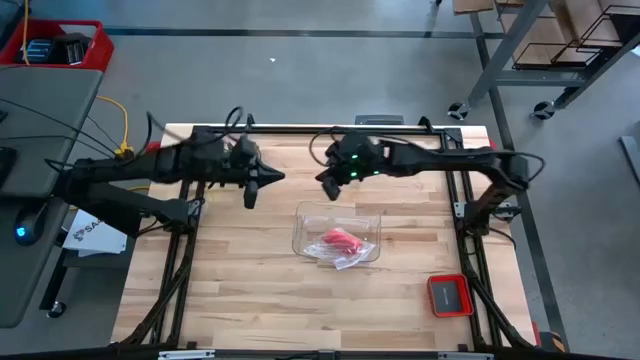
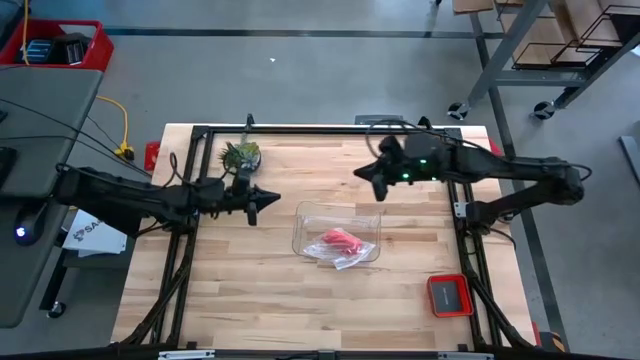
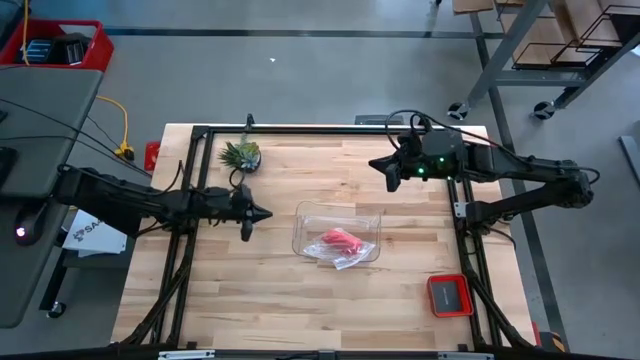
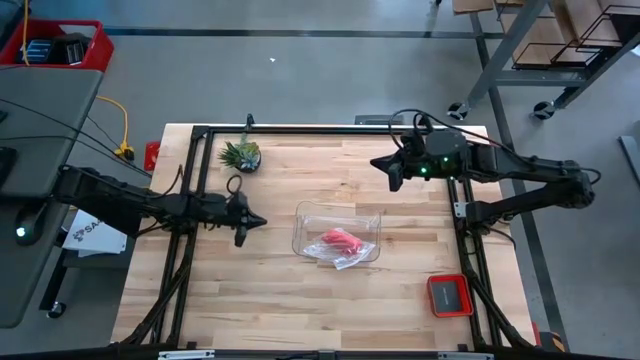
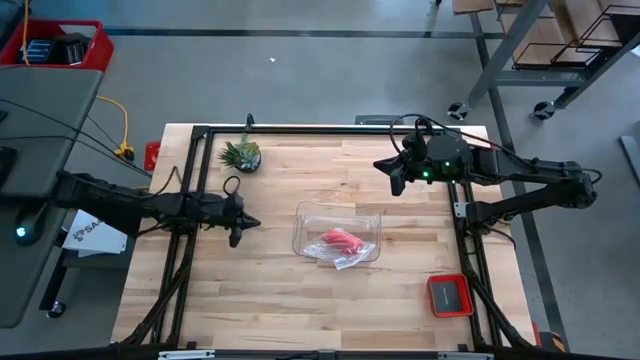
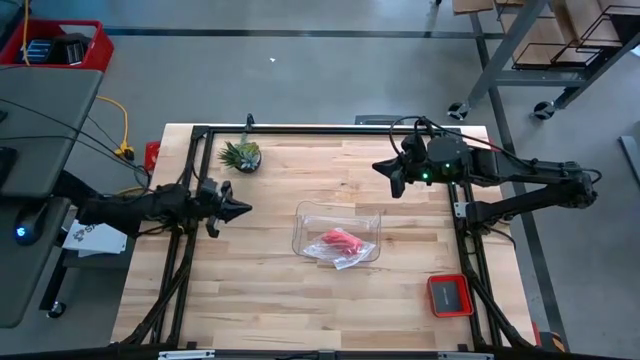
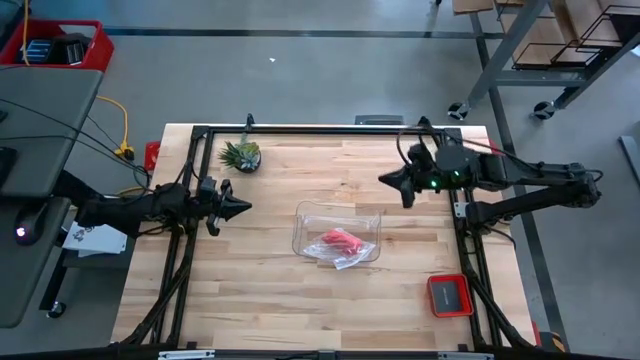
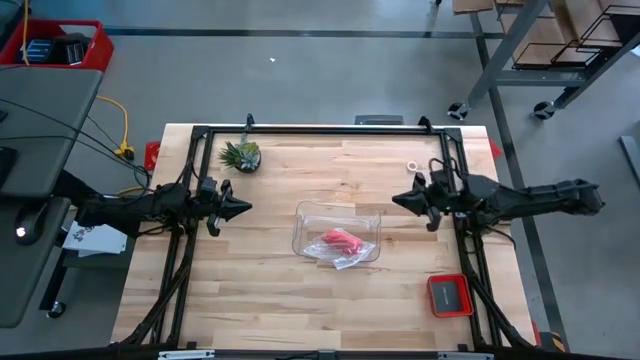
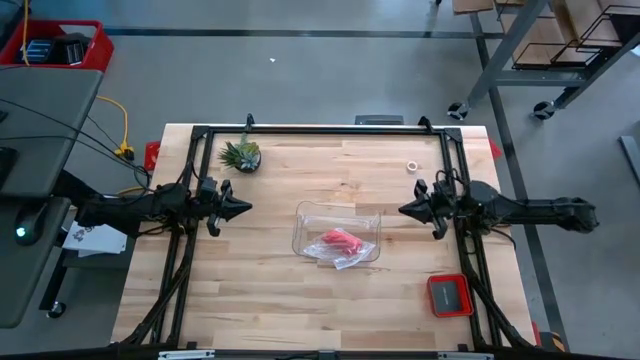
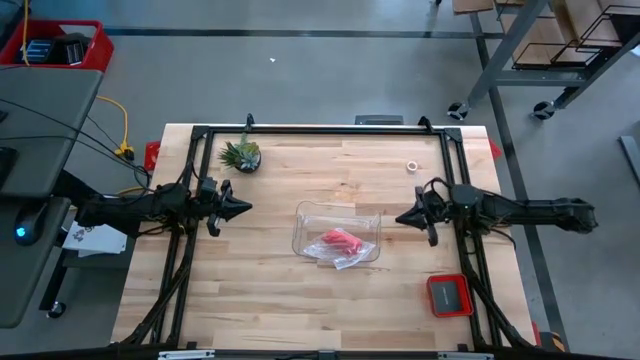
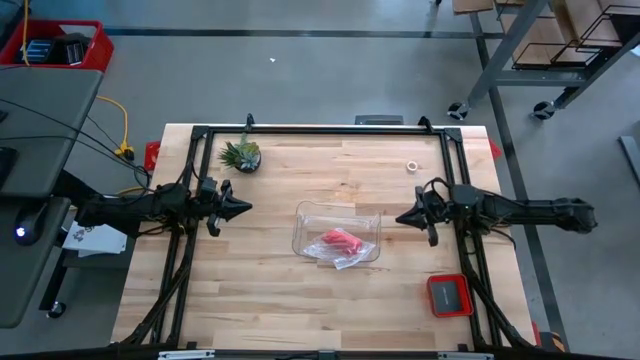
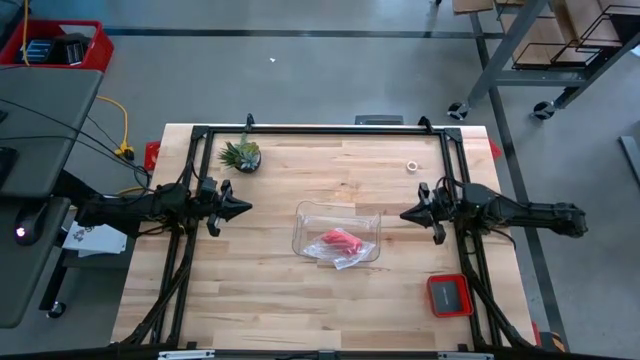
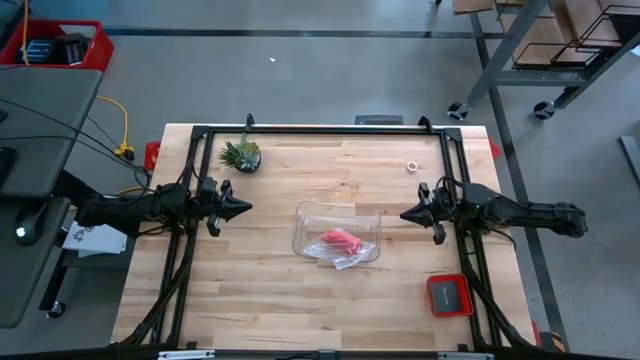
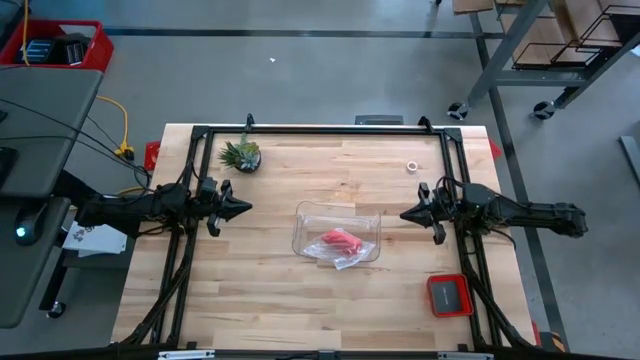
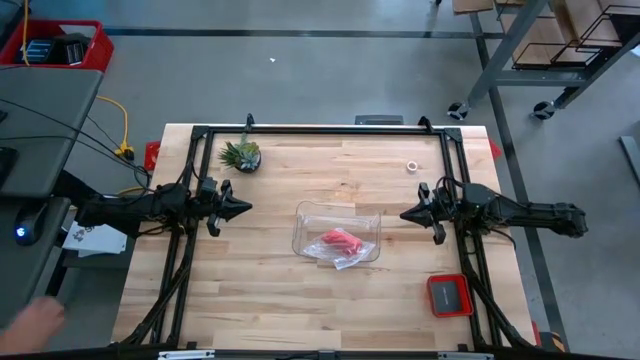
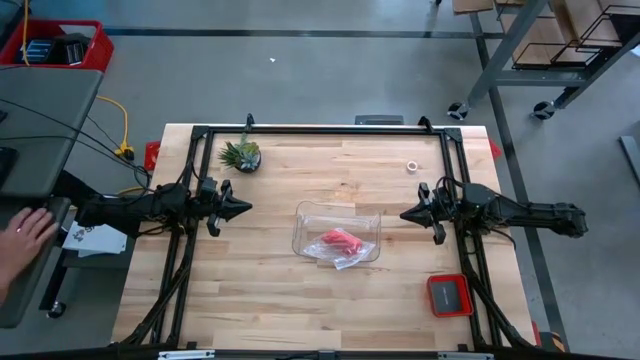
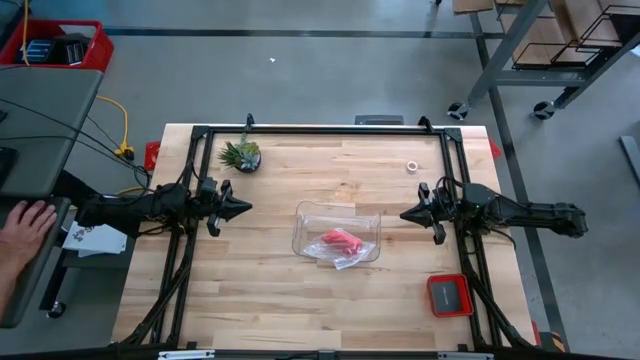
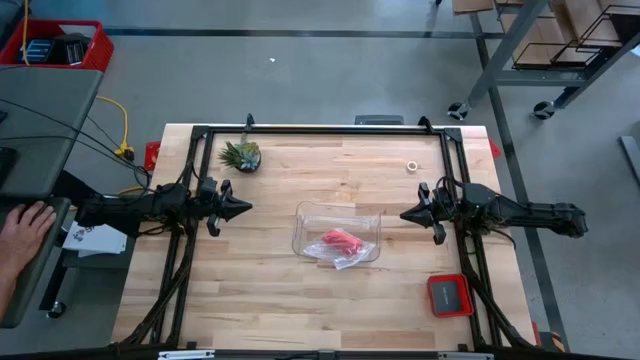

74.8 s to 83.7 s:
Task: Roll bandage
Return to Home Position

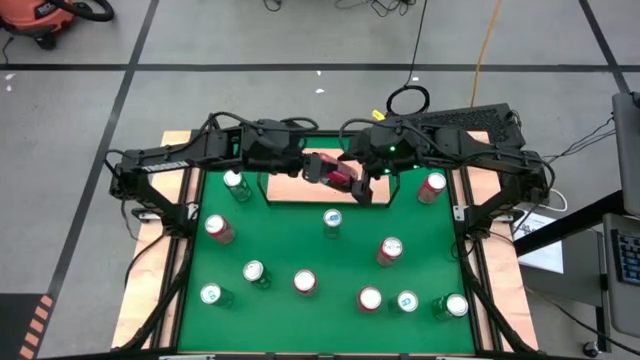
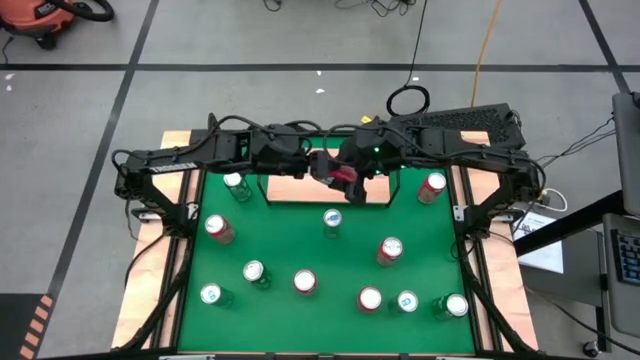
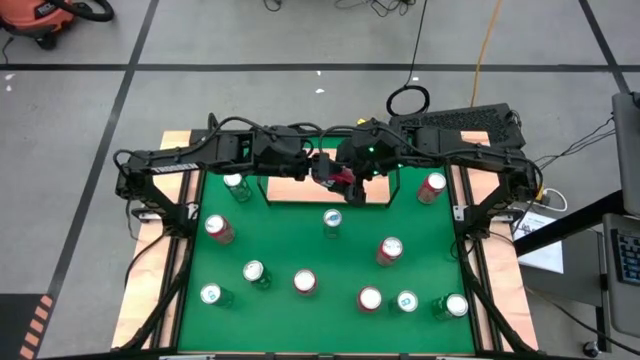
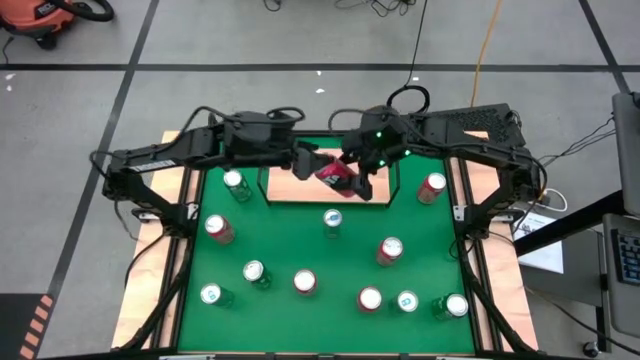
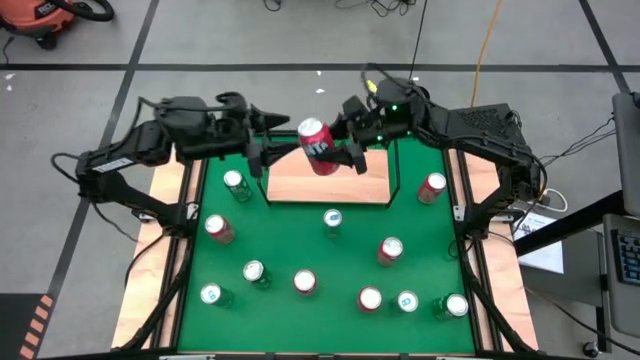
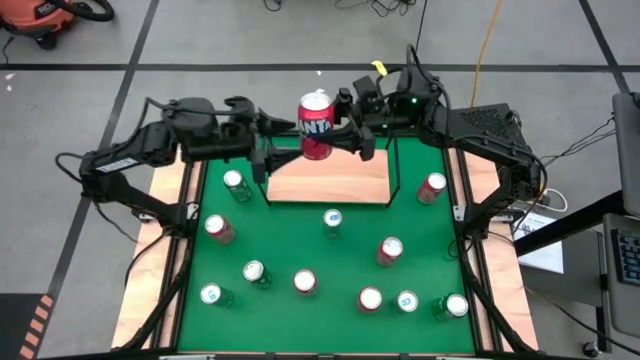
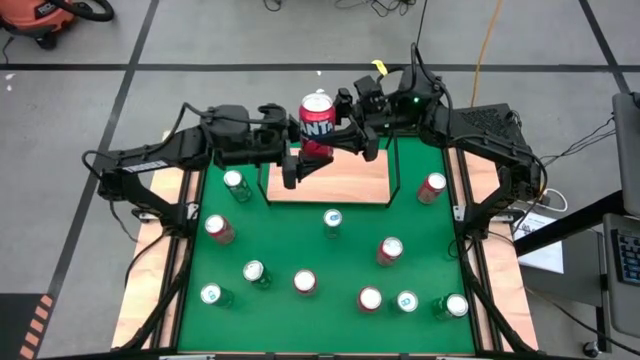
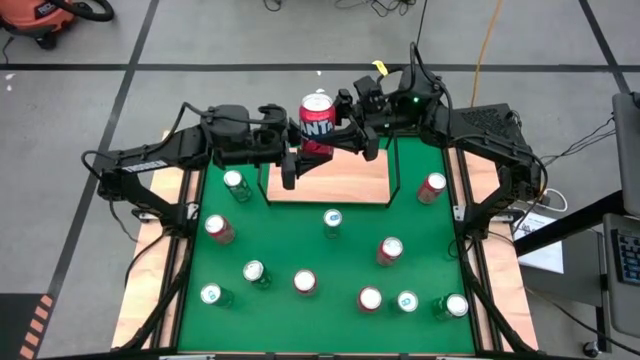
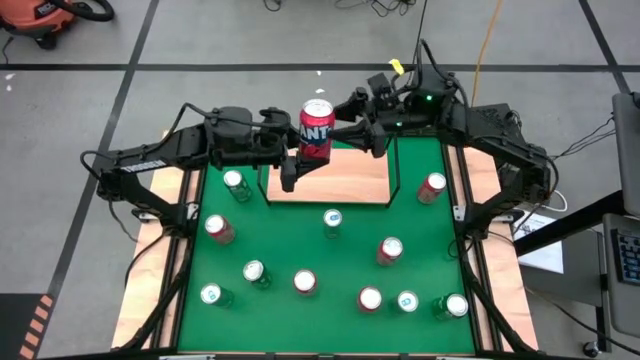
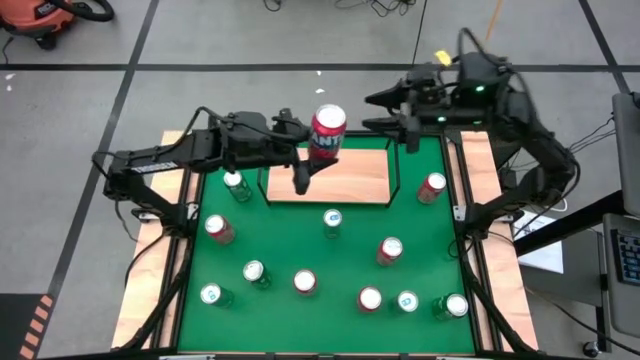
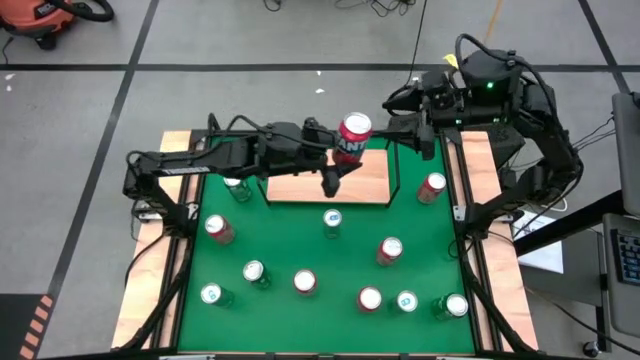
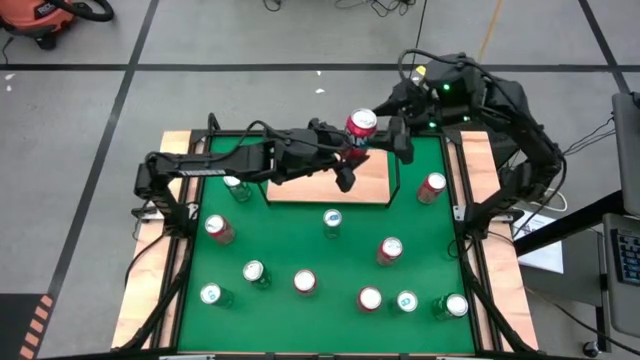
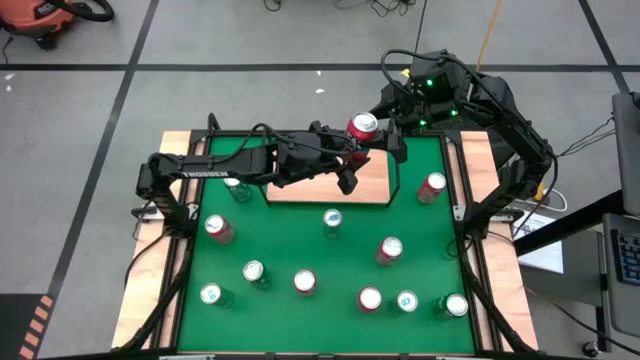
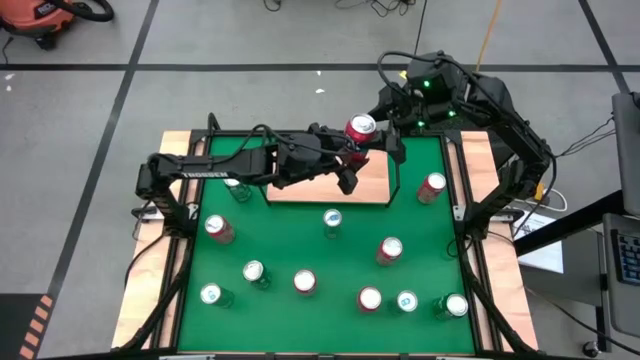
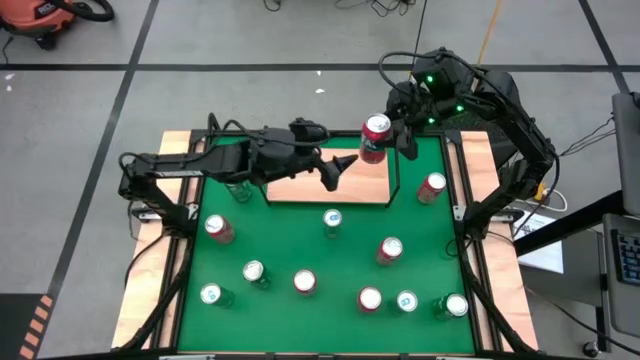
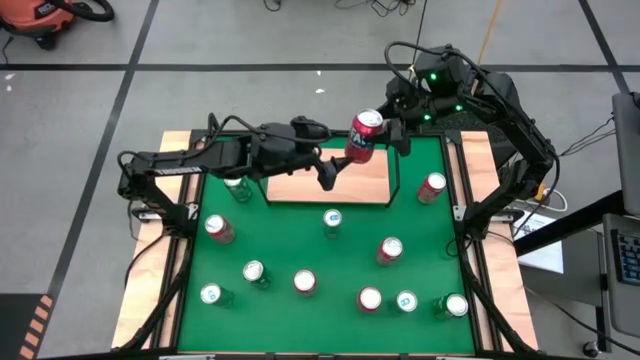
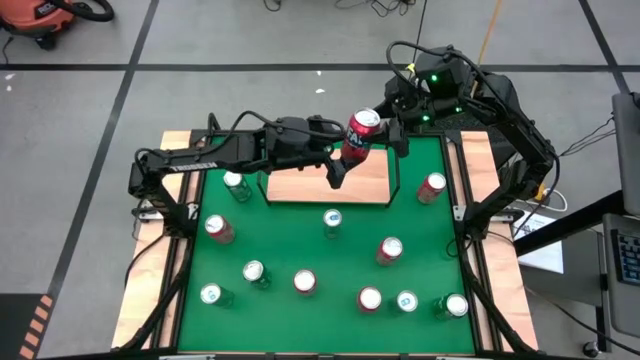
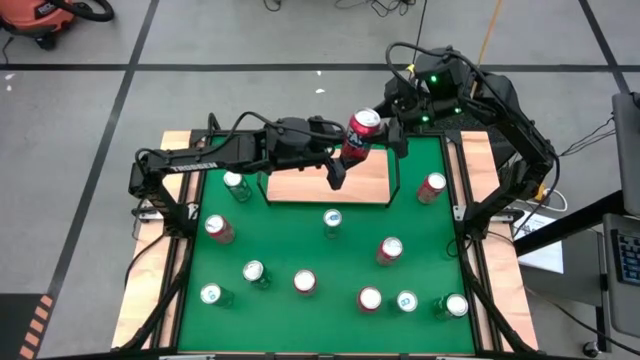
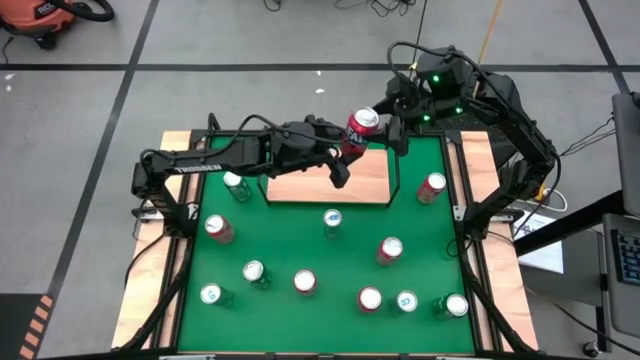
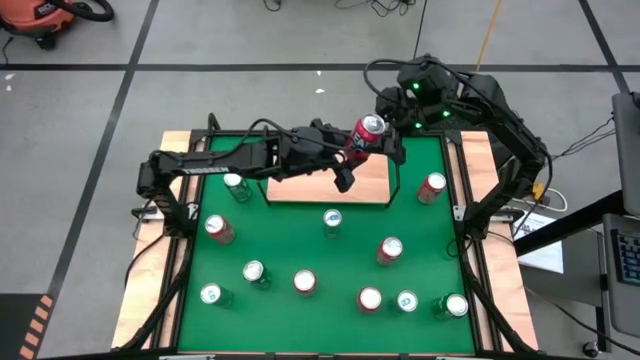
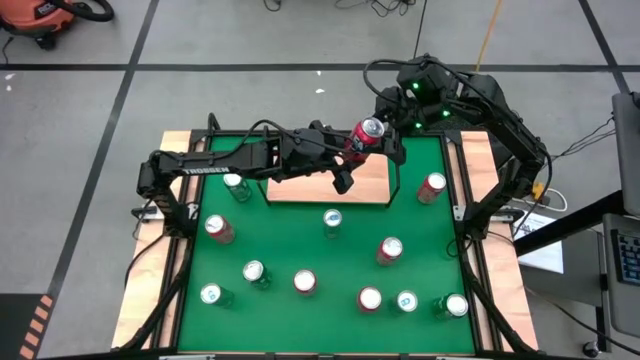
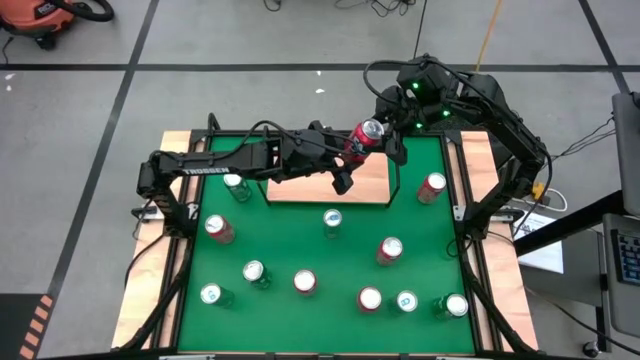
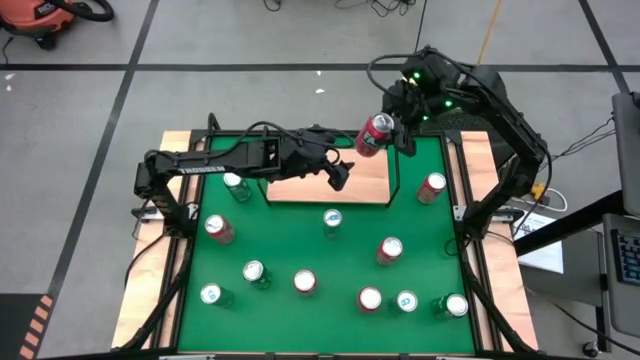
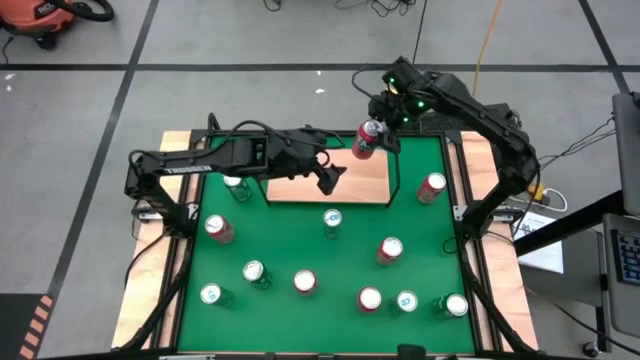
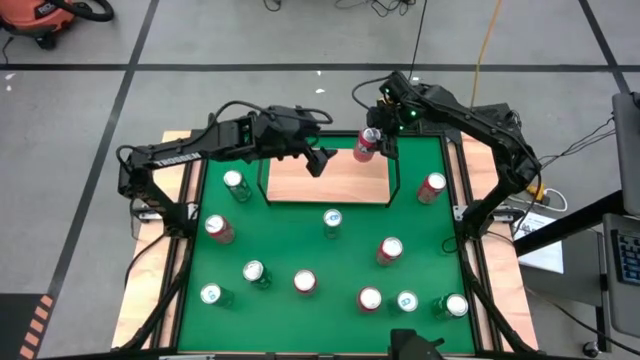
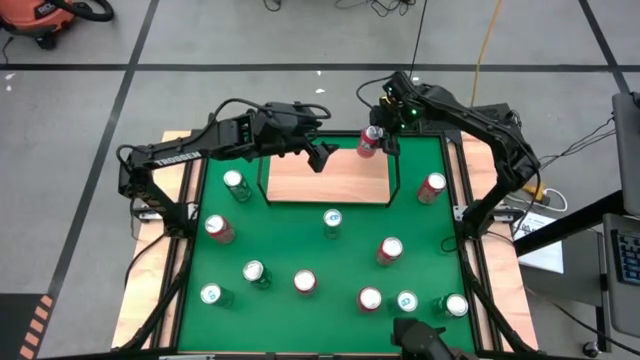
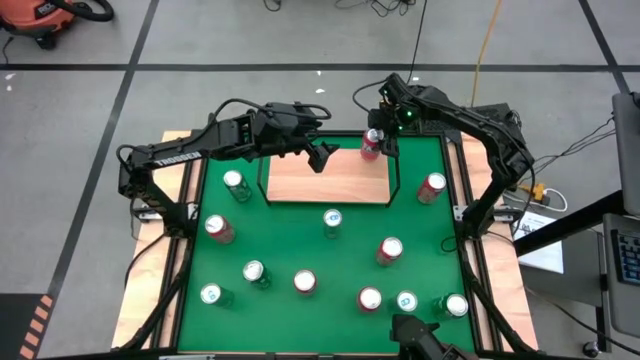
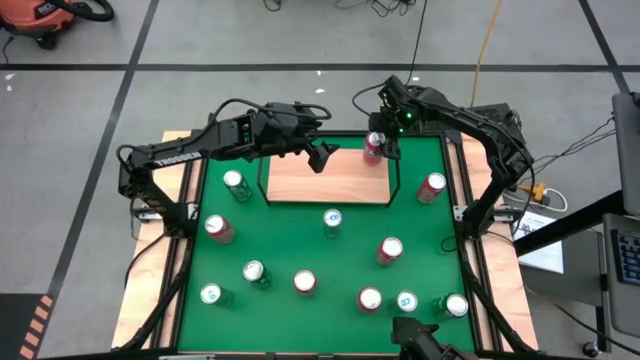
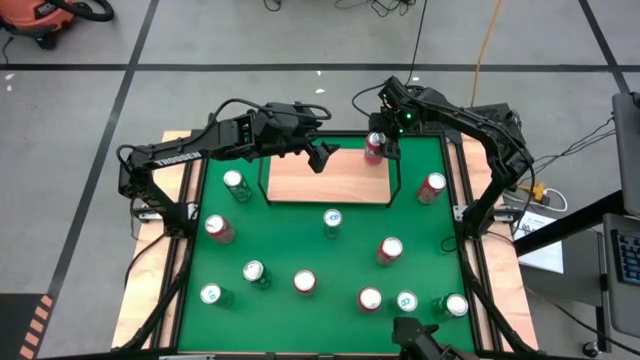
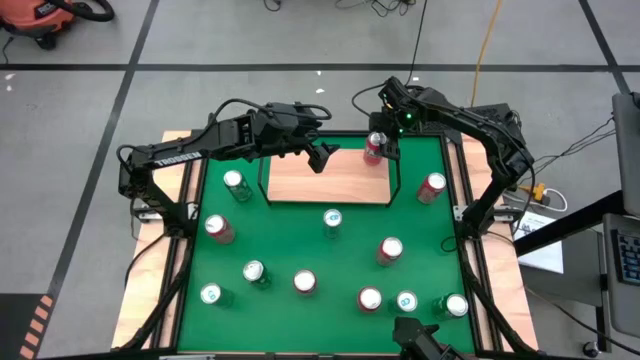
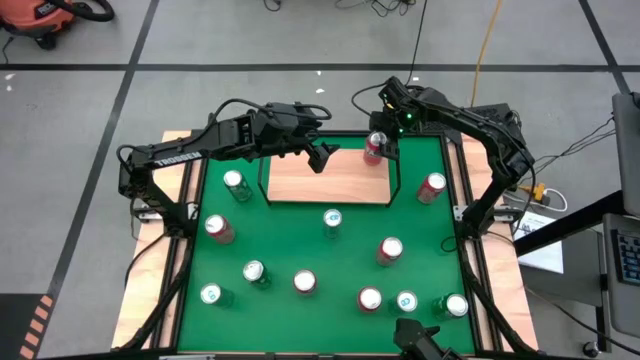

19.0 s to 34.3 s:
Task: Place canned beverage on shelf
Put the red soda can on the shelf
